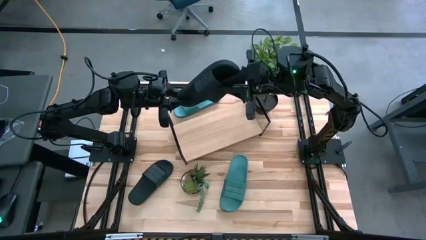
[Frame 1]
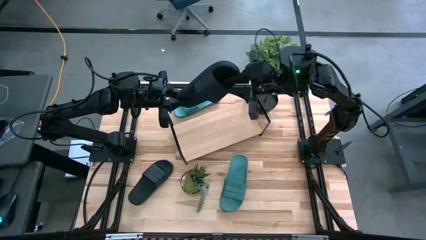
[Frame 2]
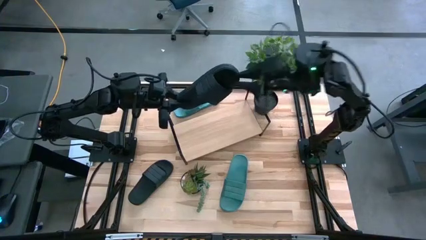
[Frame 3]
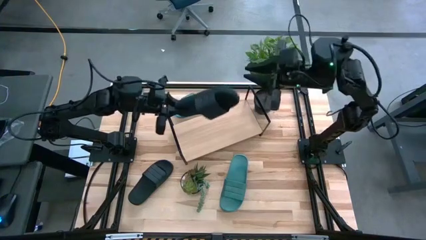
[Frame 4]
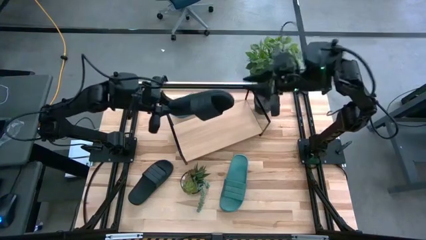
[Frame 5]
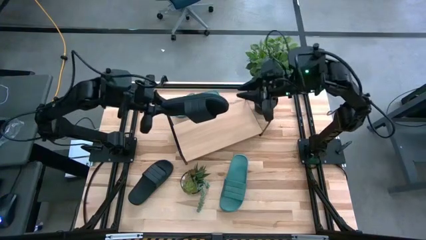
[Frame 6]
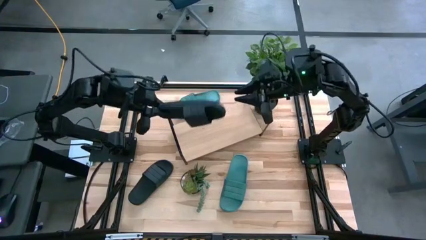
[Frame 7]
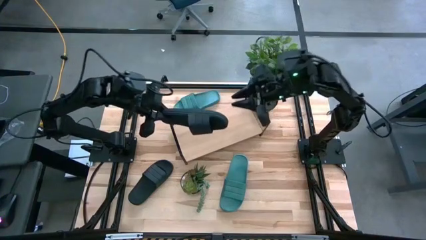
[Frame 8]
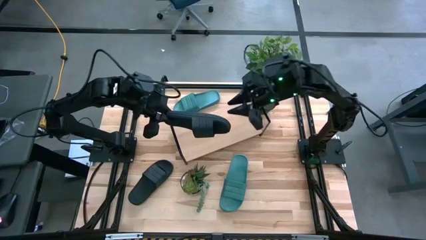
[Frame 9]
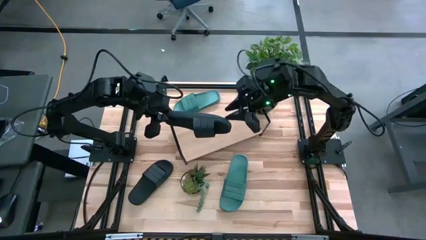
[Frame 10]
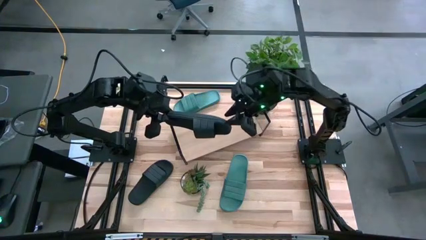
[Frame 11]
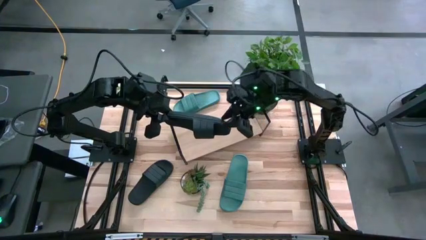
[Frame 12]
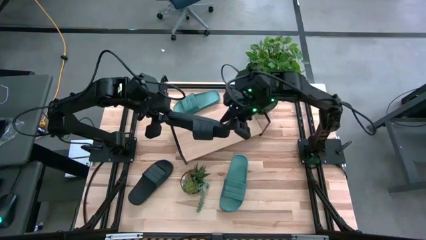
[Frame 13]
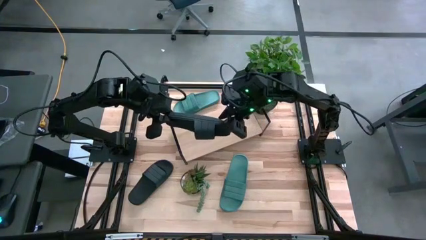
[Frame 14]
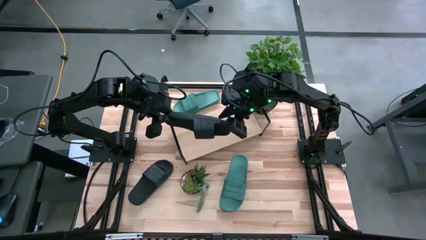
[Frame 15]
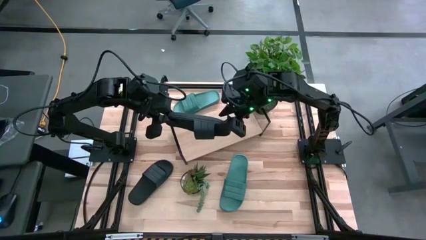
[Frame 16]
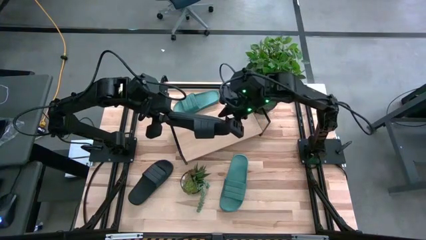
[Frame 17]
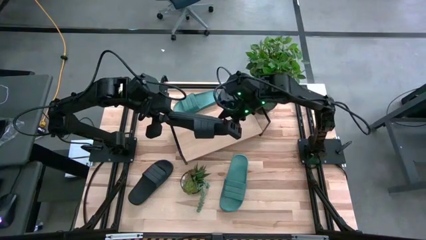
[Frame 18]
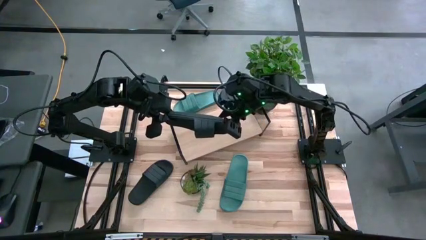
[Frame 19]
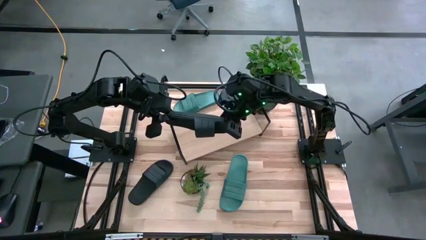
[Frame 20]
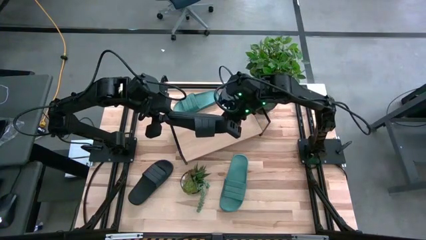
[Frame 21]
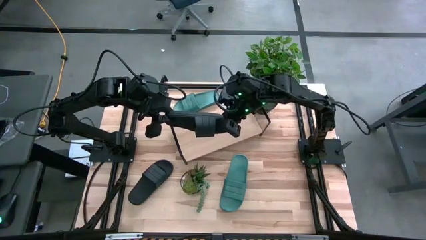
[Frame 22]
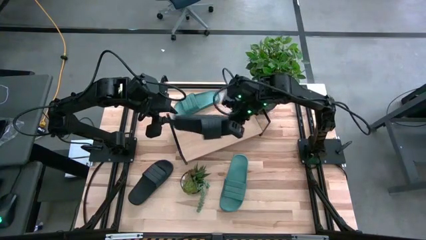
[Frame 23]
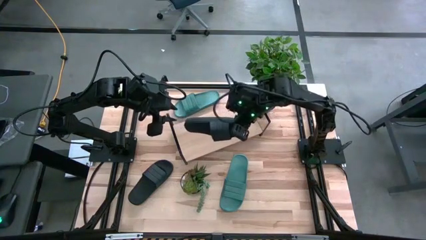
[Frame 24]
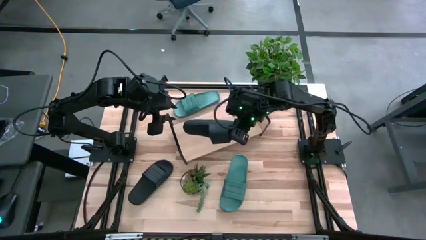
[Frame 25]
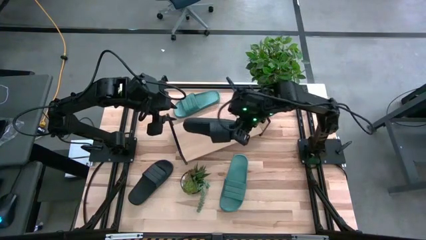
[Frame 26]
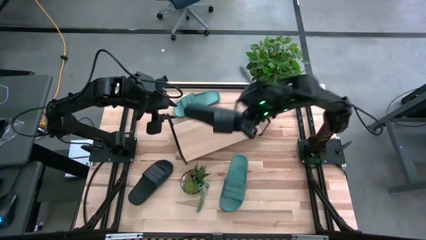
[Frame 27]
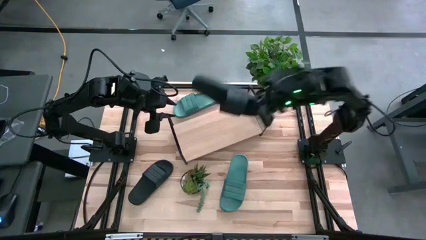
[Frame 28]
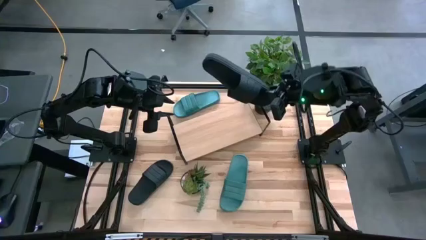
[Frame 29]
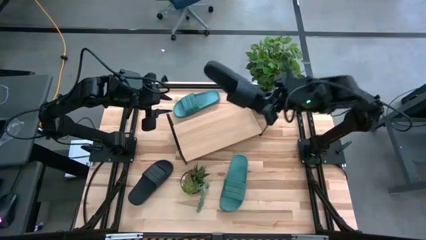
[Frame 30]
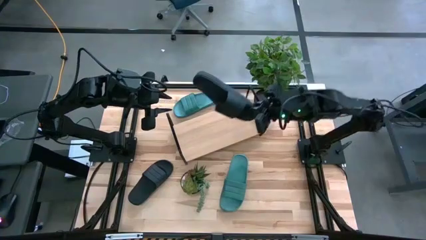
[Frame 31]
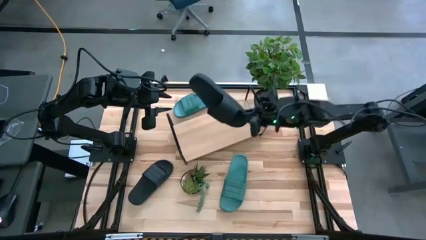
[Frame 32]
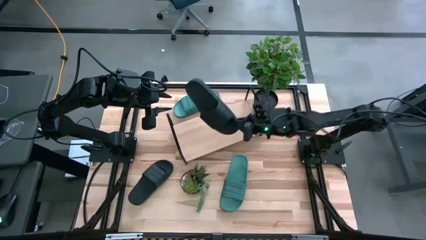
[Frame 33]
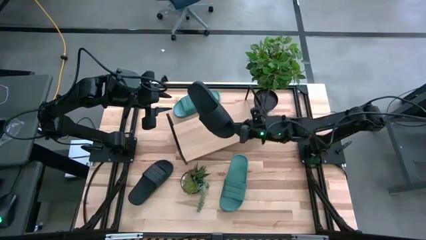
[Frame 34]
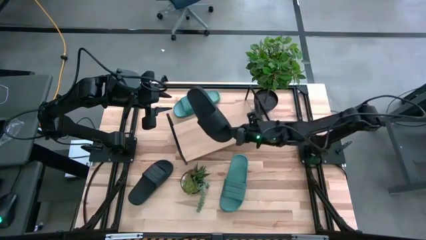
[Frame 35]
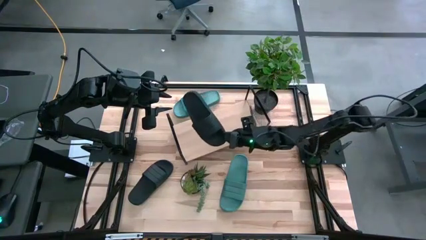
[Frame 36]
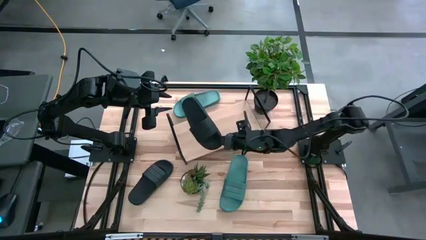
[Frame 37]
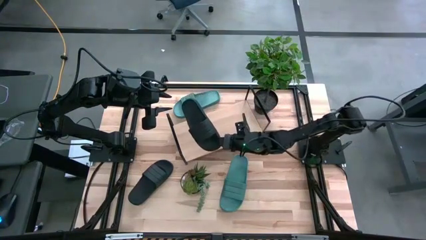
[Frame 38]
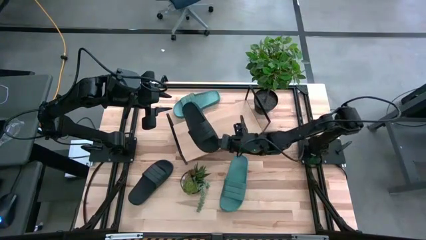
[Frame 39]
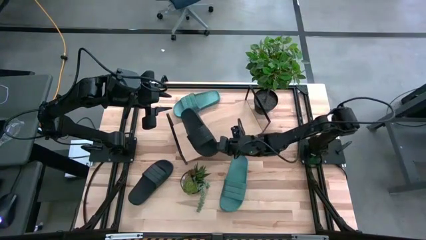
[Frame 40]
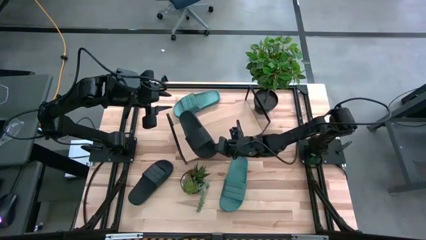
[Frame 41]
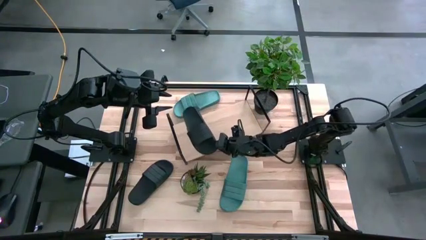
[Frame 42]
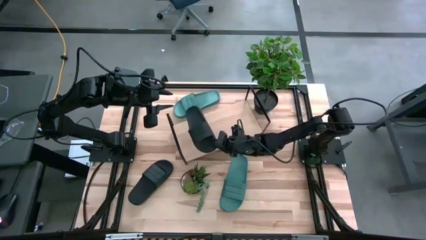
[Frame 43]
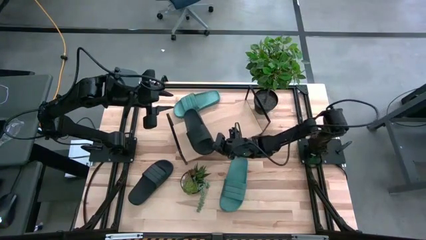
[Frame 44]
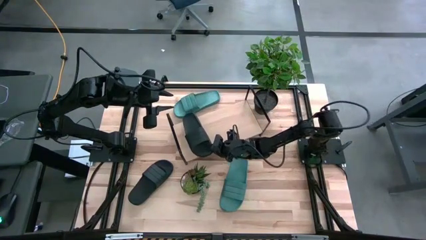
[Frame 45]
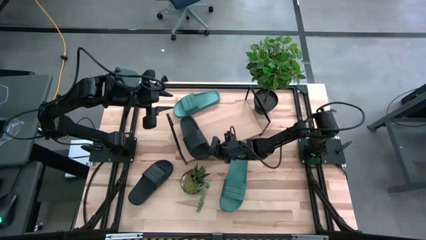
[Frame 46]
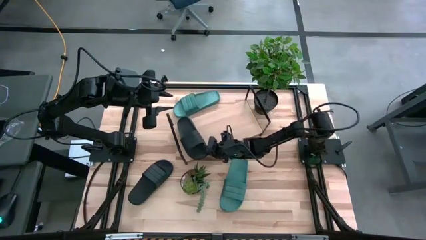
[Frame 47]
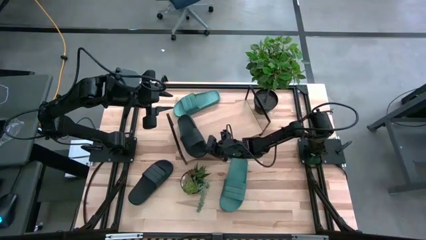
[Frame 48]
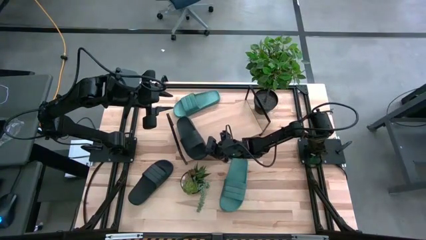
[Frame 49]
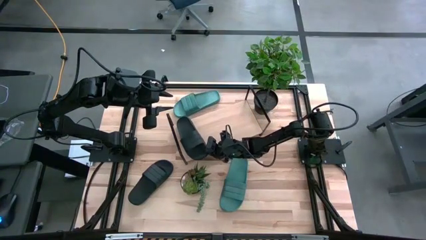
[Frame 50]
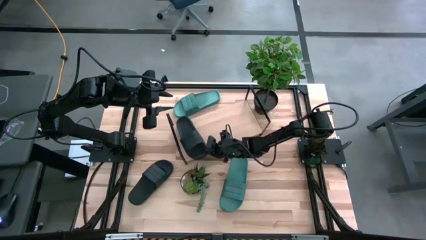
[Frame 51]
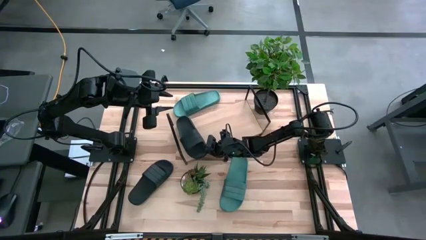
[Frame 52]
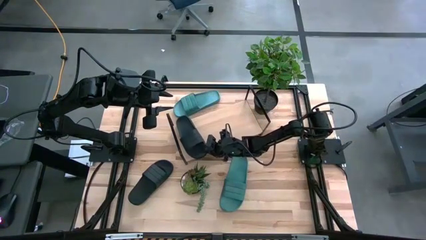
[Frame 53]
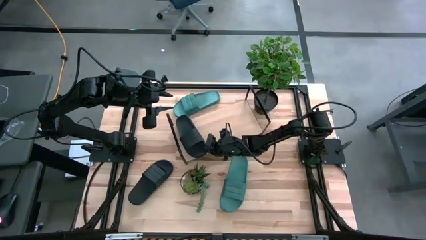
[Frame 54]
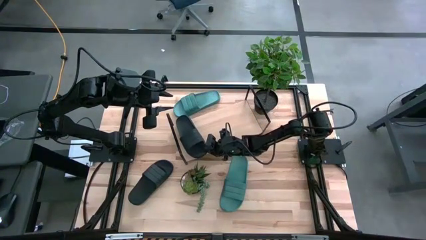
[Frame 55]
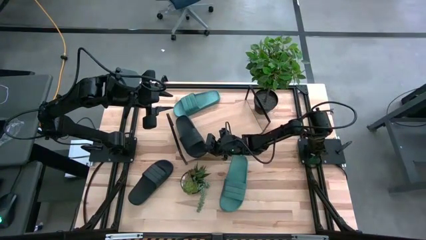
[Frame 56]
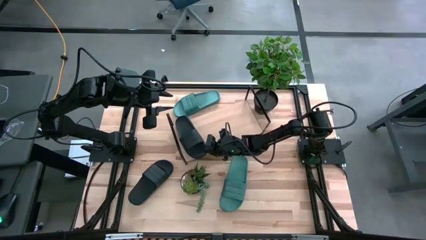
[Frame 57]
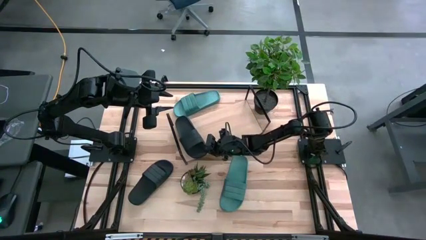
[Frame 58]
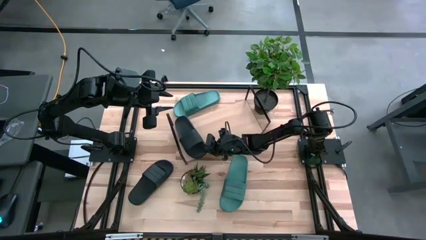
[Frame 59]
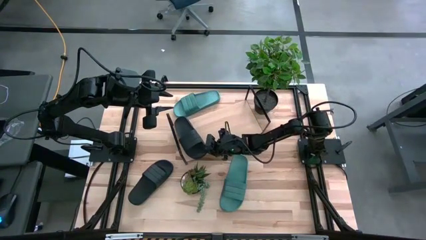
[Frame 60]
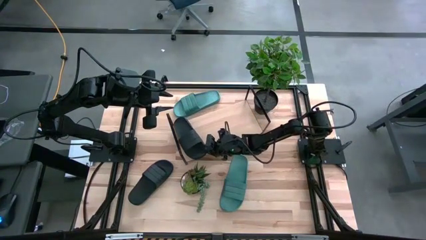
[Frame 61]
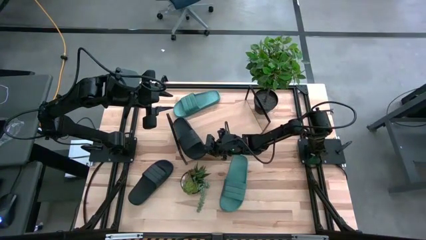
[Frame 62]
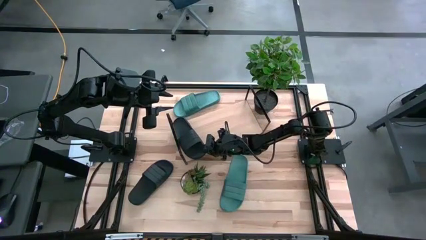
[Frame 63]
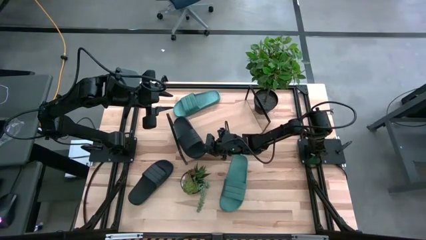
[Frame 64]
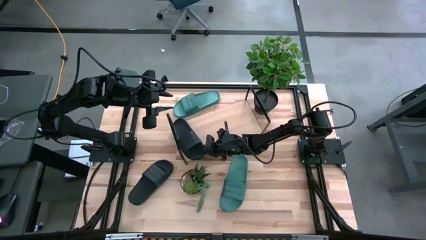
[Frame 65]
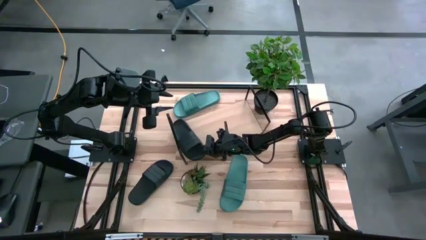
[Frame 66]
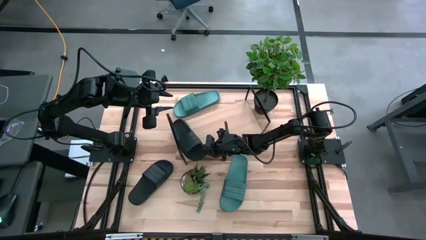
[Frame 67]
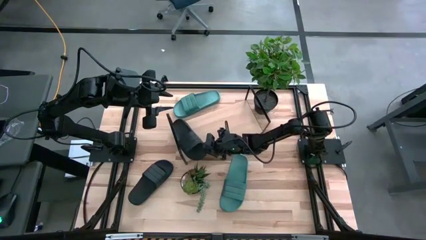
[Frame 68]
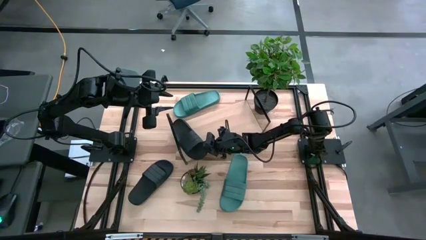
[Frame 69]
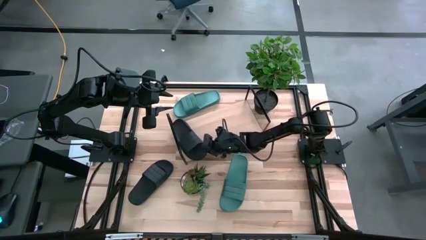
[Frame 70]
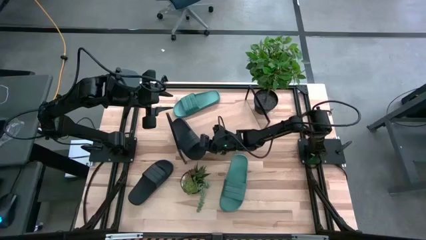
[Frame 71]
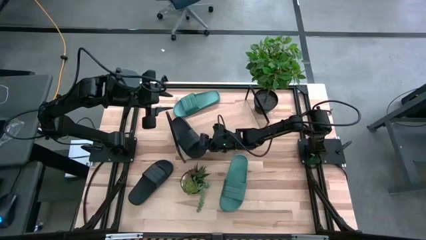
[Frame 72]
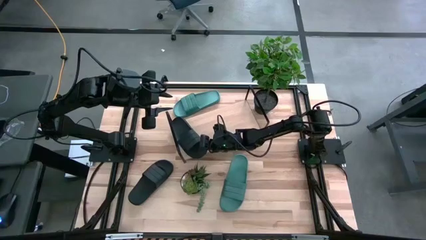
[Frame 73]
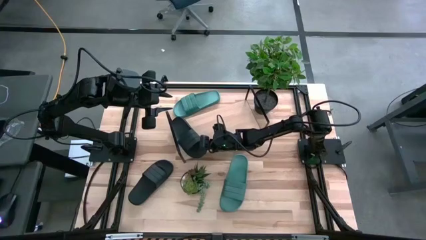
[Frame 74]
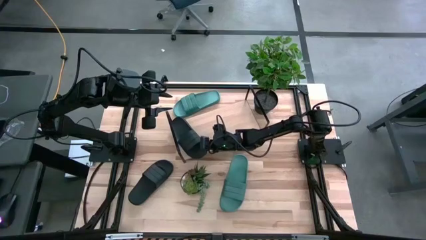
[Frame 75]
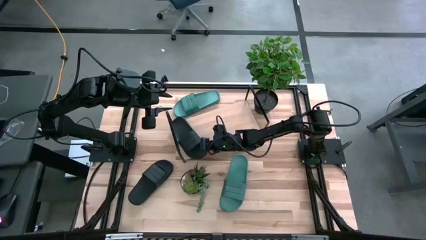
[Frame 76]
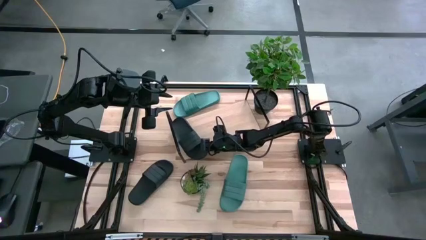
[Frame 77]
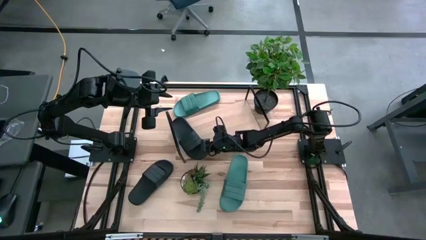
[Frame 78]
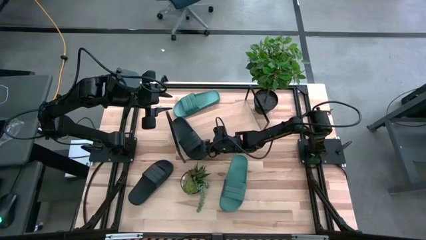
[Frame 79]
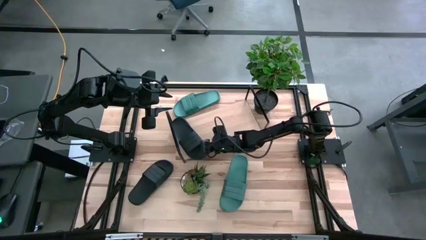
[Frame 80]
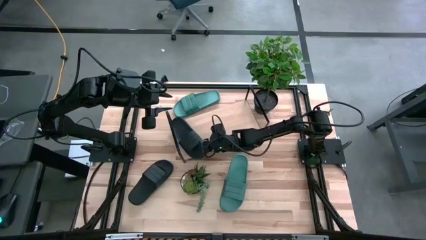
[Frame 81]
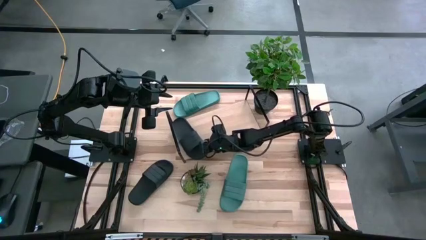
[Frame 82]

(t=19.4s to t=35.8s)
Task: Pick and place slides into the shelf
Put the right black slipper on the shelf
